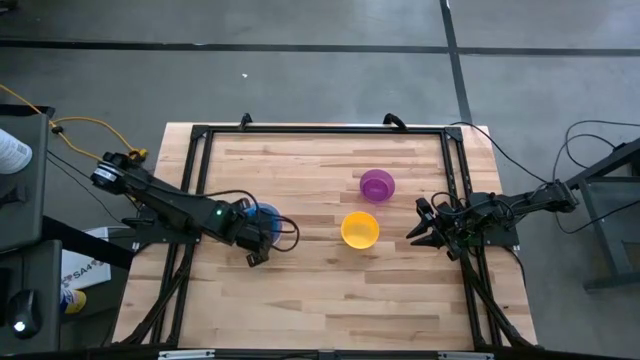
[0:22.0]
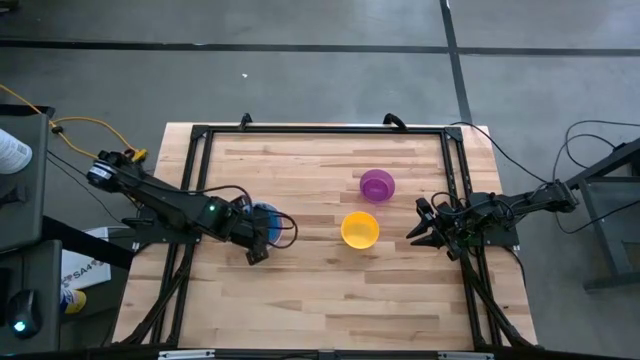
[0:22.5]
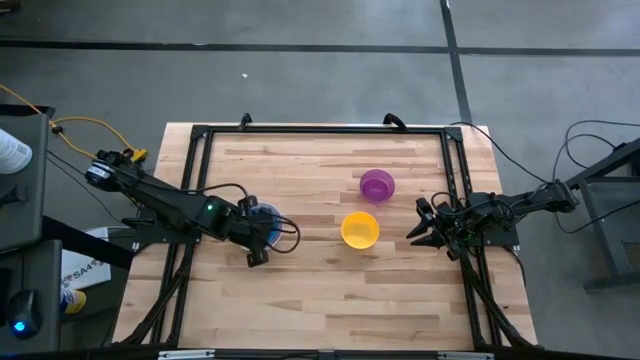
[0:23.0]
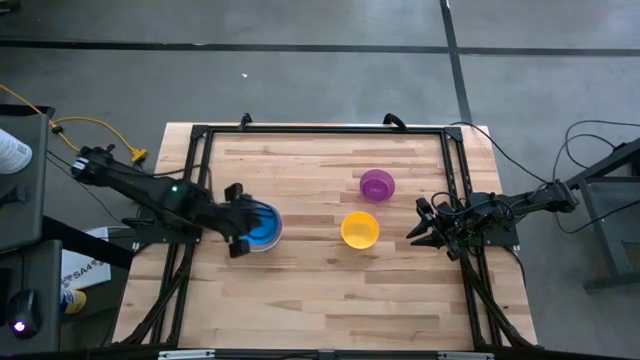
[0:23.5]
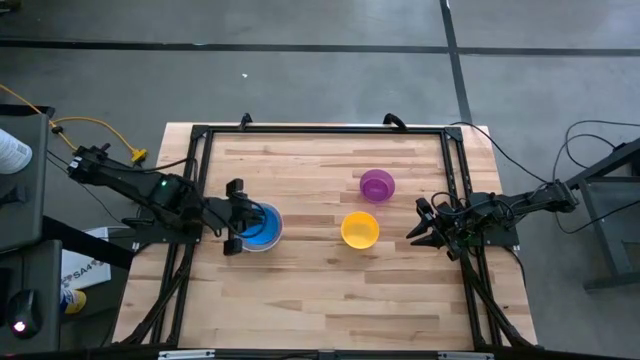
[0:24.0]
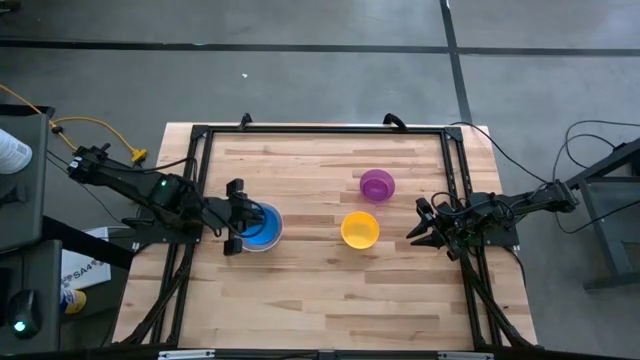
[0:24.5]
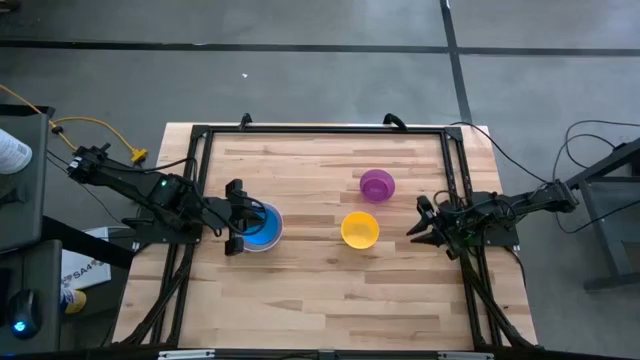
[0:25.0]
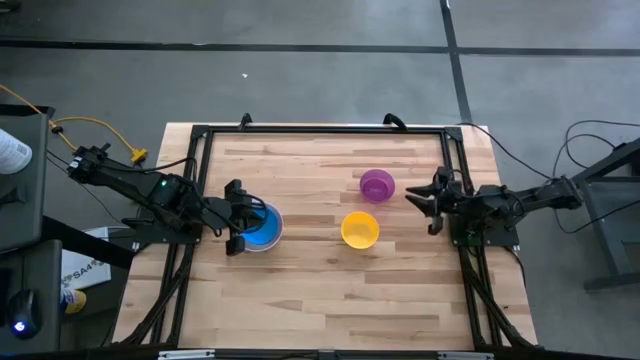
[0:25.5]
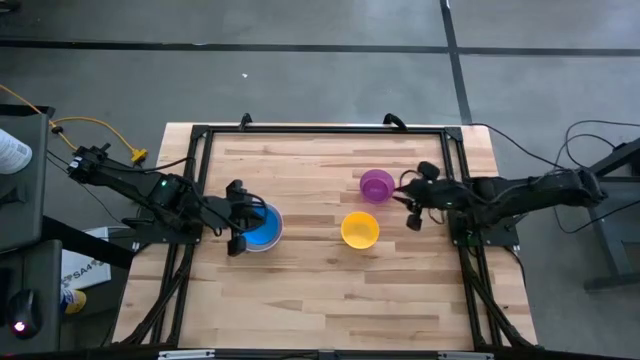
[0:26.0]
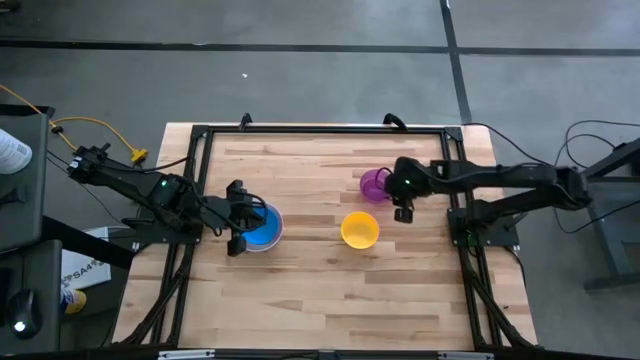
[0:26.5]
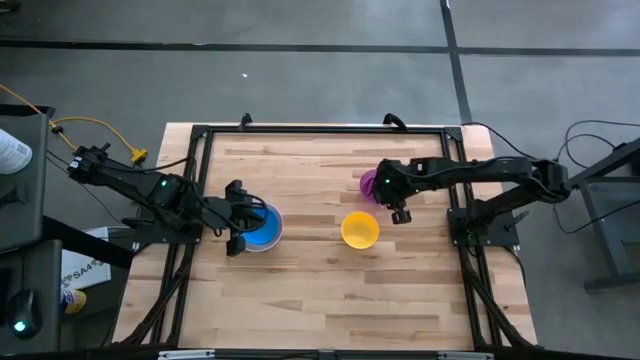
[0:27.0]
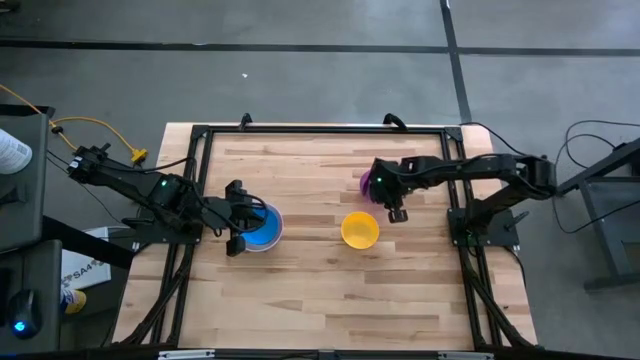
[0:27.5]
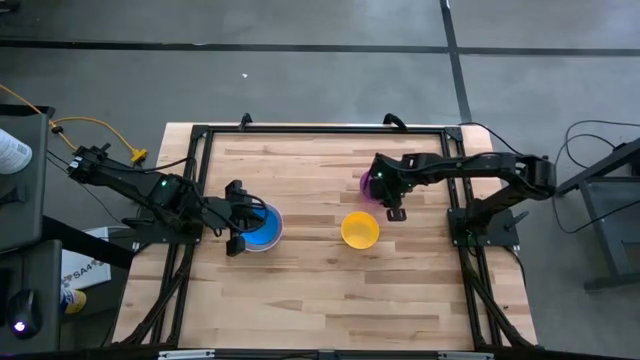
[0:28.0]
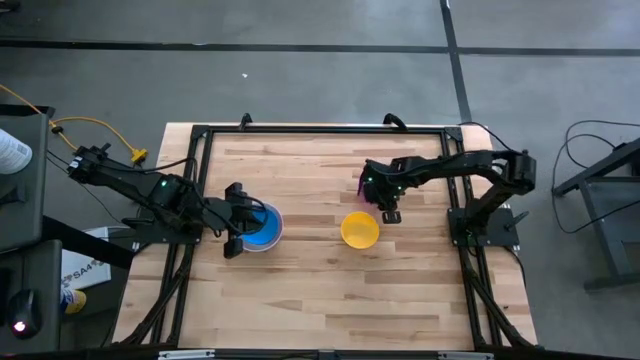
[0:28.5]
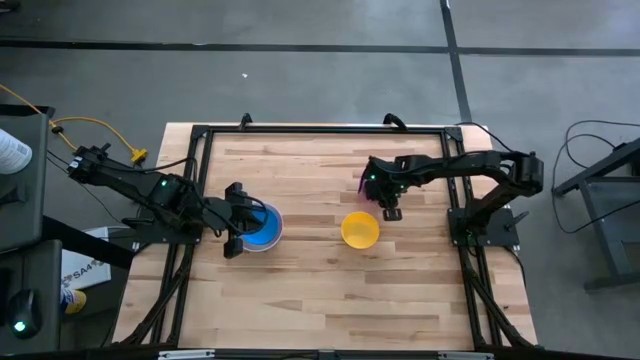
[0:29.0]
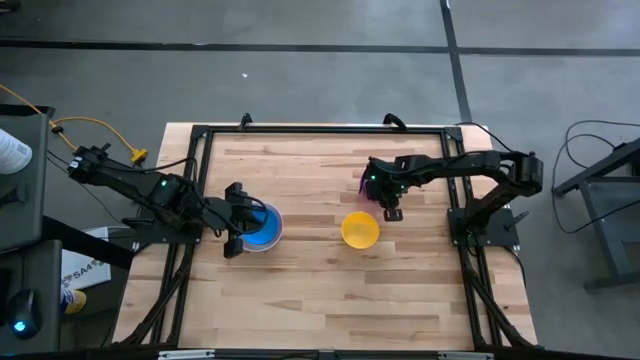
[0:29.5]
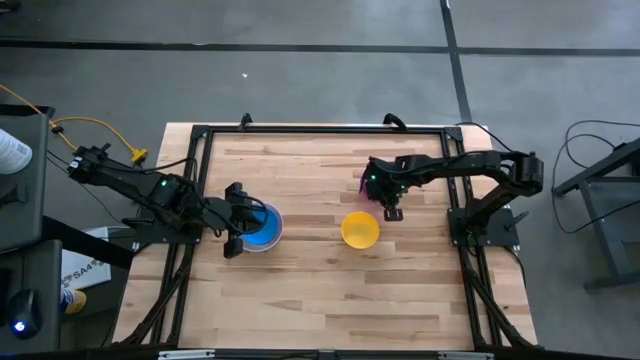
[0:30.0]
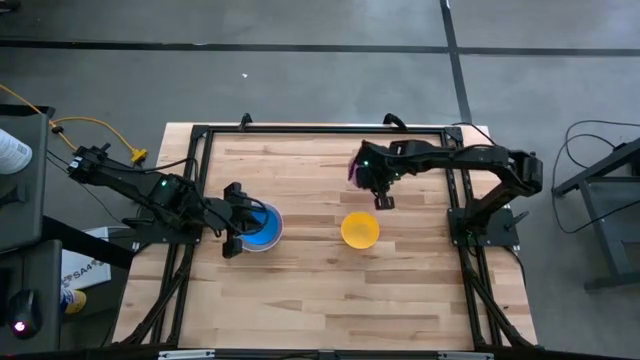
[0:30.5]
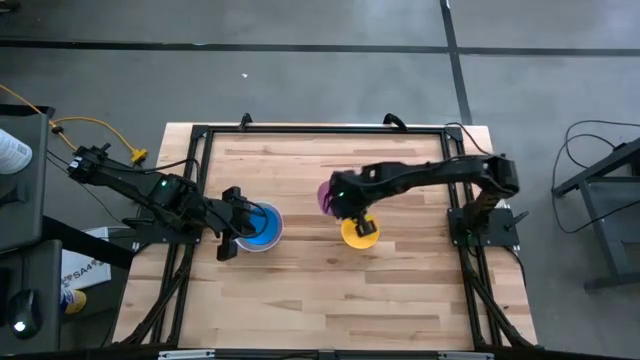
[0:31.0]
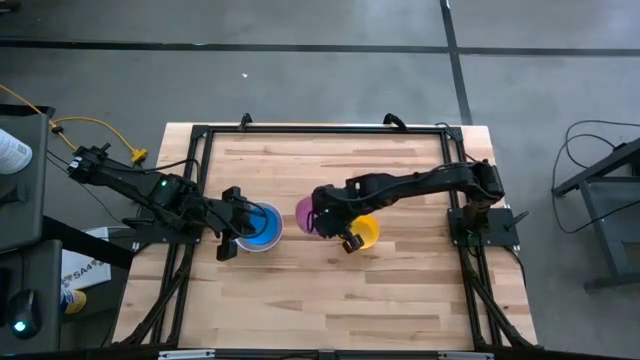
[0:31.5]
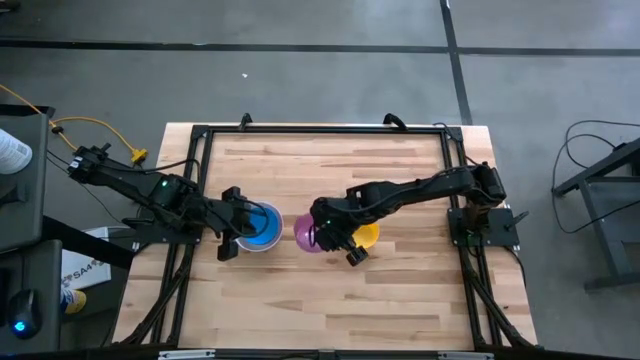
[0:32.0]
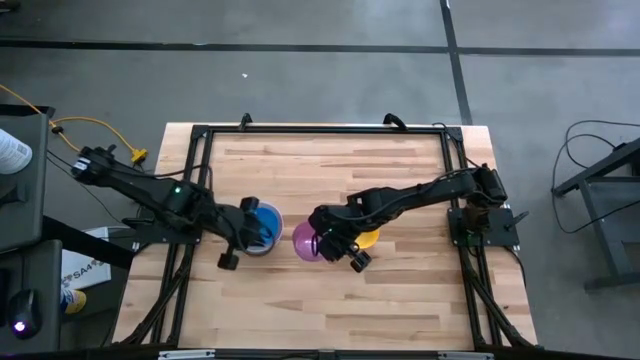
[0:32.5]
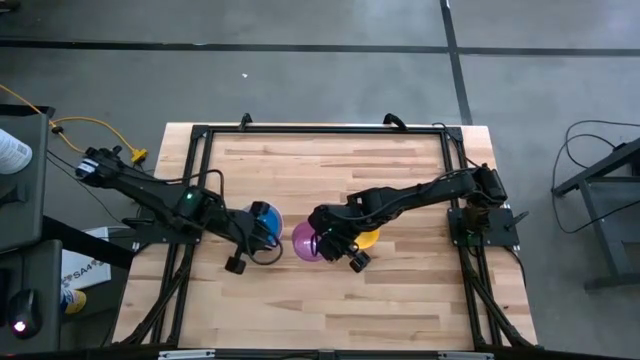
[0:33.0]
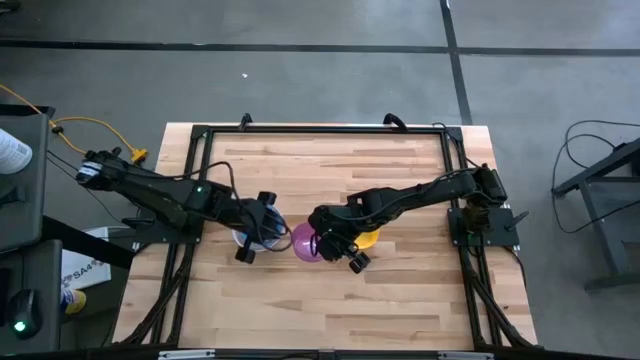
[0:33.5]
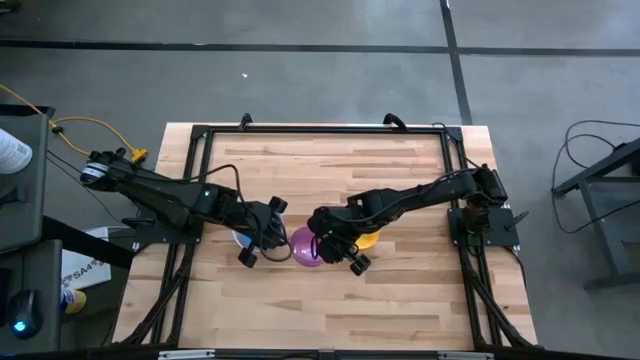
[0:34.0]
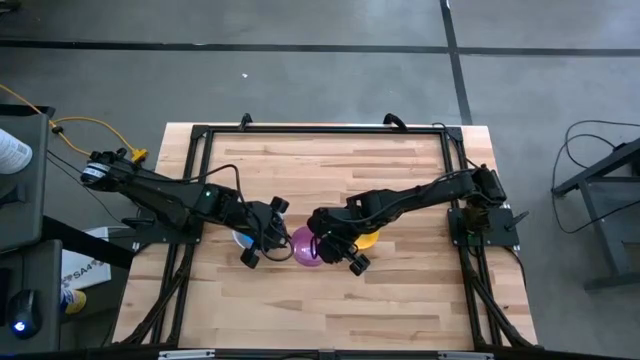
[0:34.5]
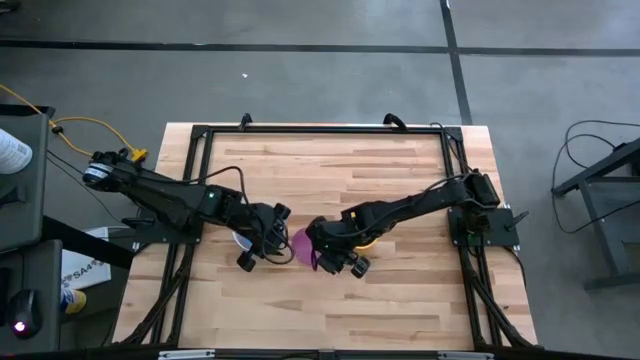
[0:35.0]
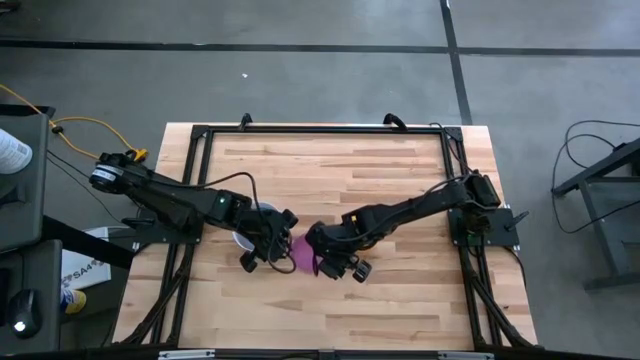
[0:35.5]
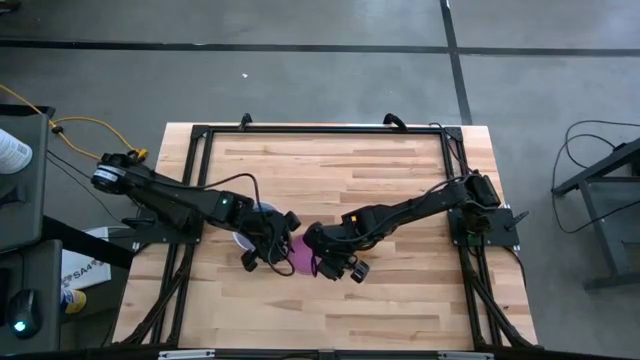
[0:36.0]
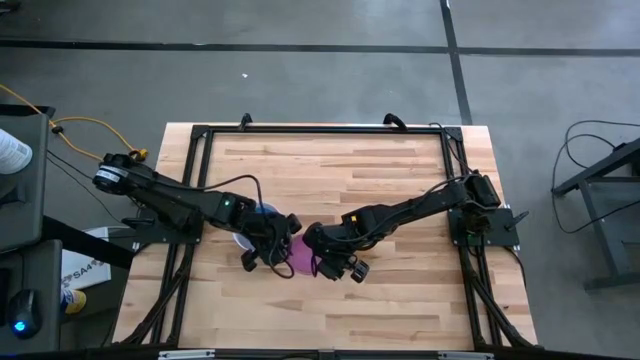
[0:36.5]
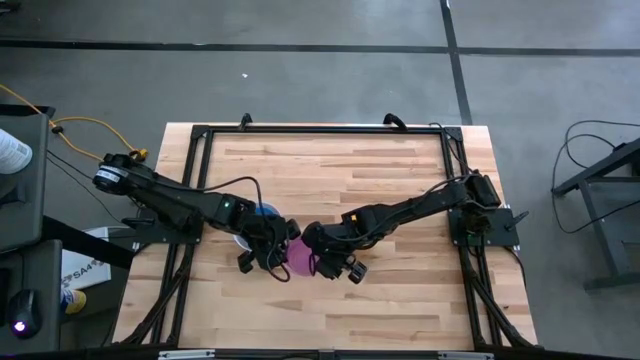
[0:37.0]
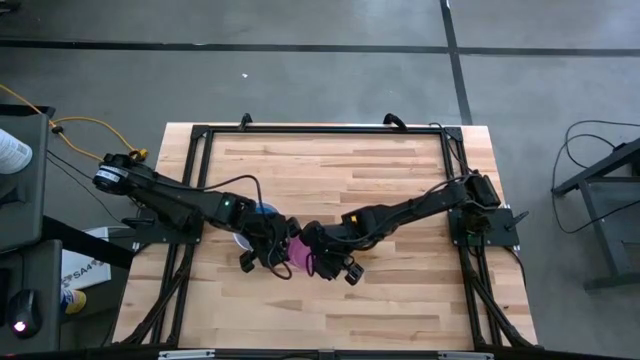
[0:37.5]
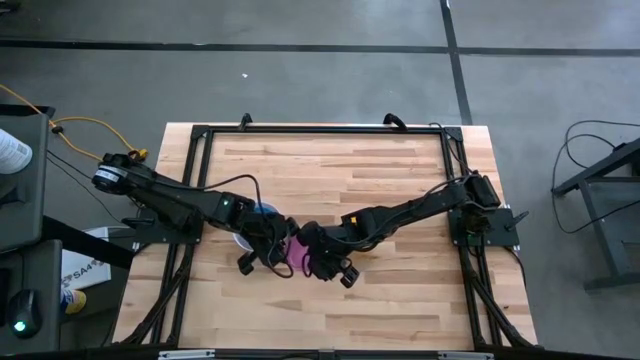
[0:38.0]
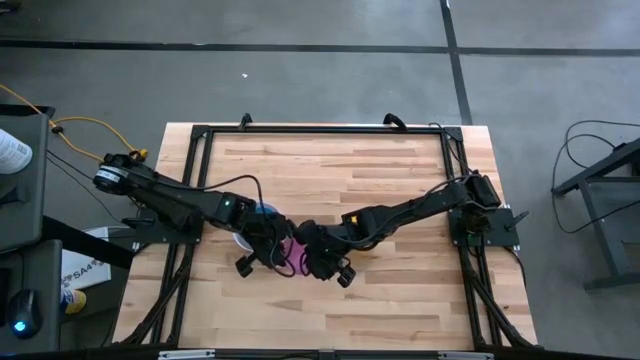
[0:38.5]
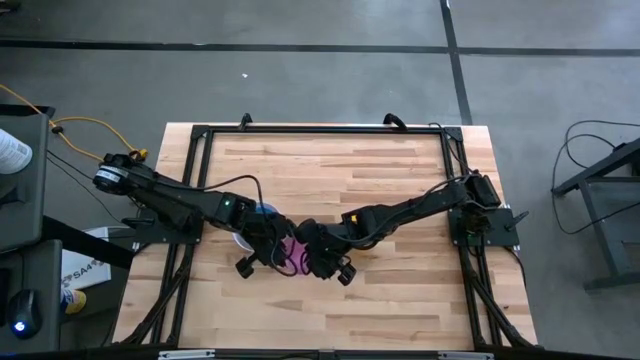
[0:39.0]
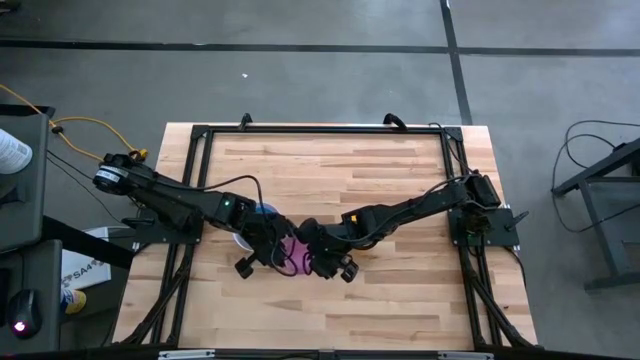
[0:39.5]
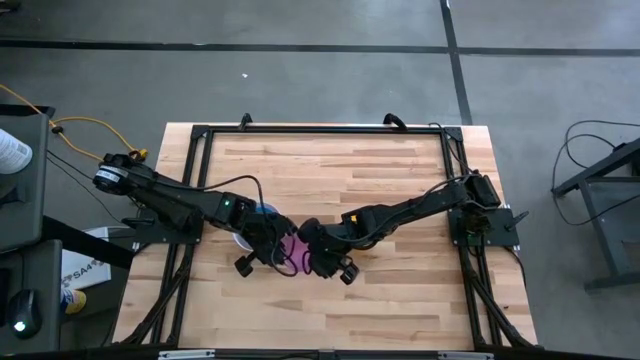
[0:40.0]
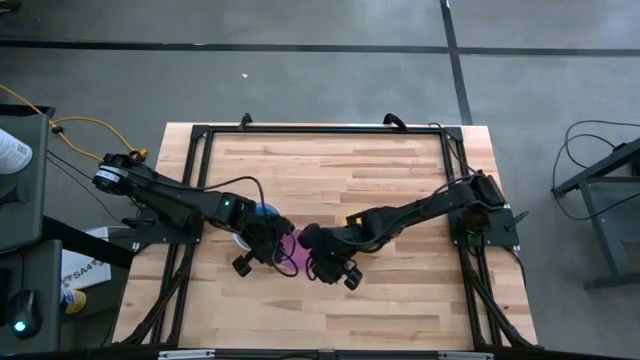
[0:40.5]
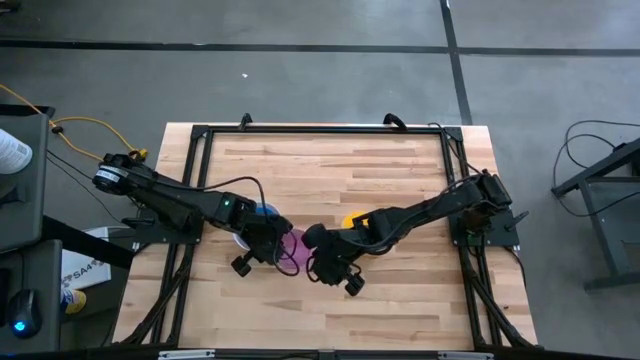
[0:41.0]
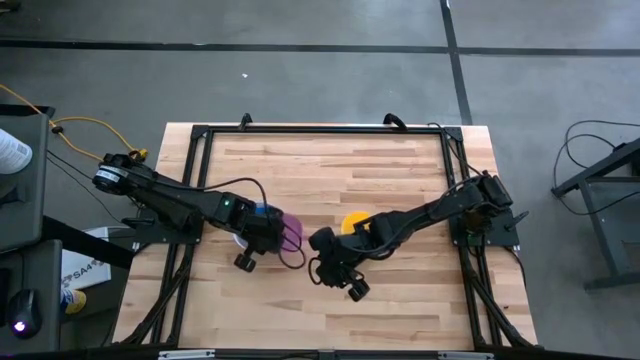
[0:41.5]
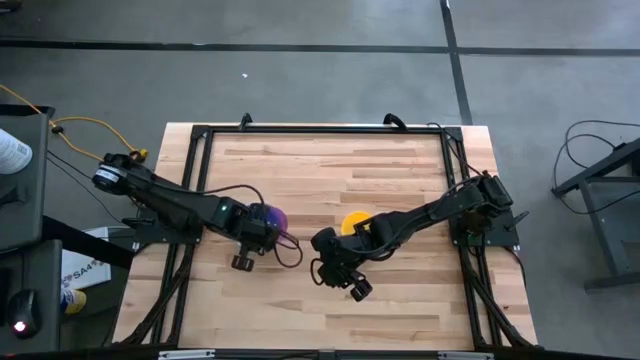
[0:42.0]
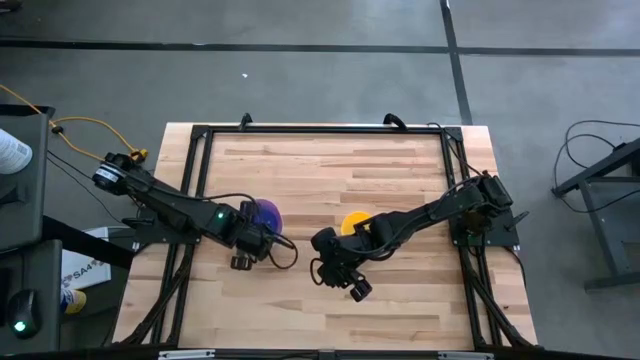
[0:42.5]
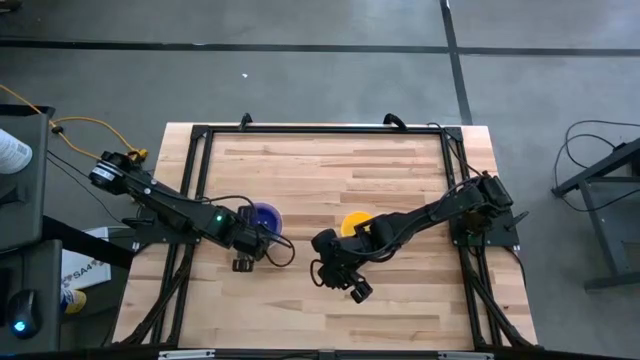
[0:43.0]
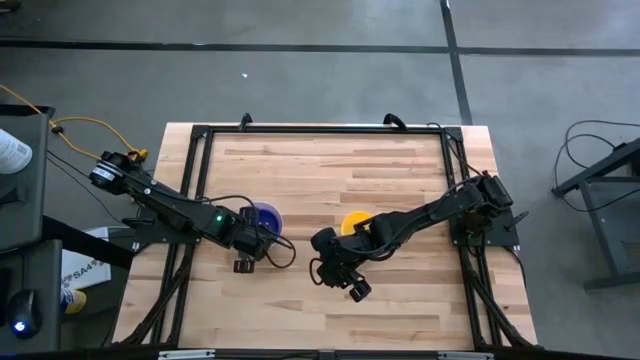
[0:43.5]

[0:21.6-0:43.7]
Stack the violet bowl on the blue bowl
